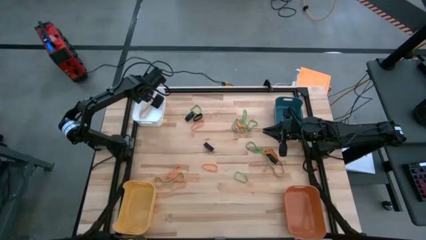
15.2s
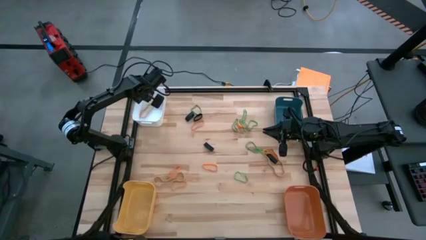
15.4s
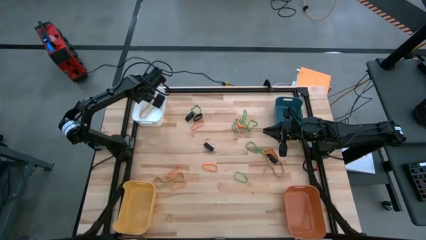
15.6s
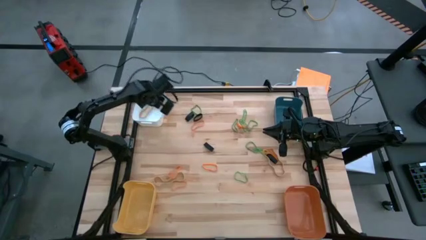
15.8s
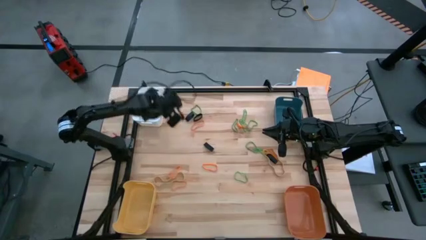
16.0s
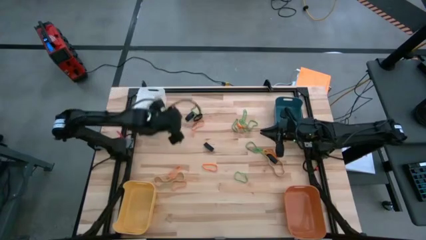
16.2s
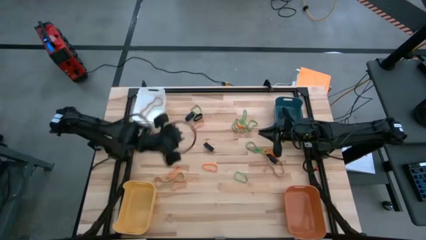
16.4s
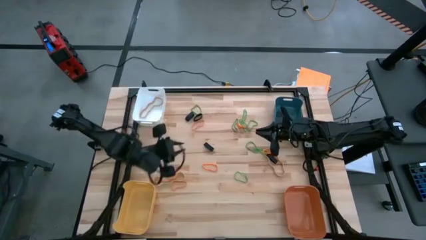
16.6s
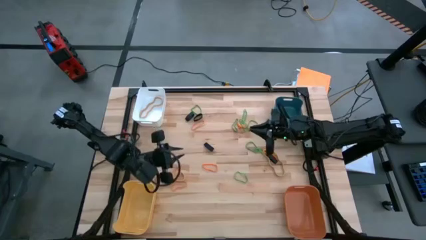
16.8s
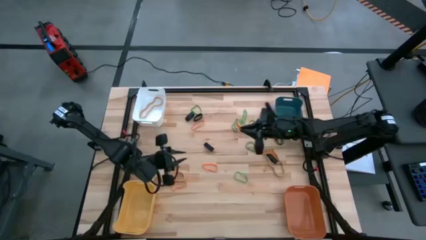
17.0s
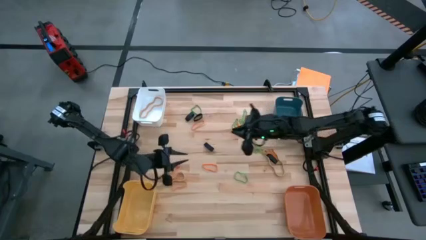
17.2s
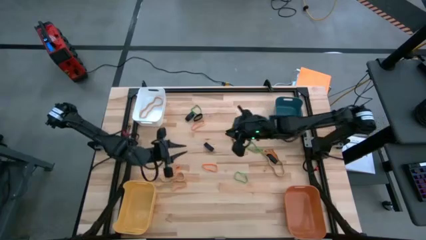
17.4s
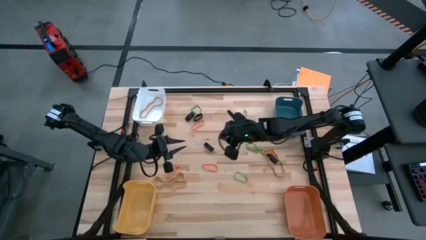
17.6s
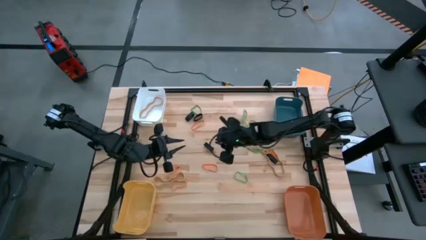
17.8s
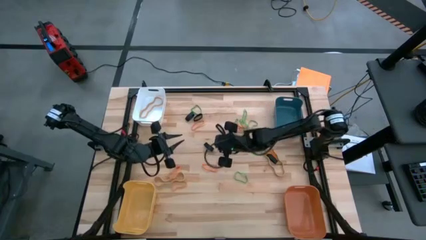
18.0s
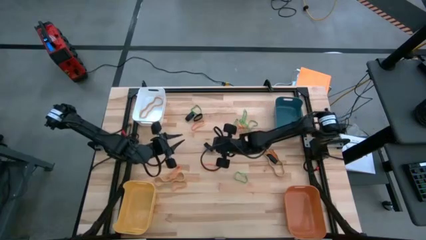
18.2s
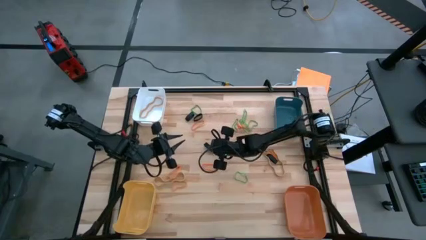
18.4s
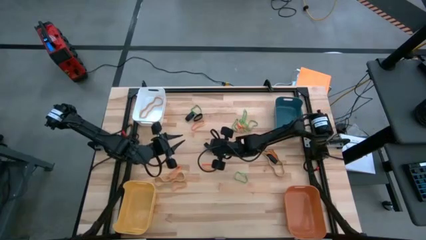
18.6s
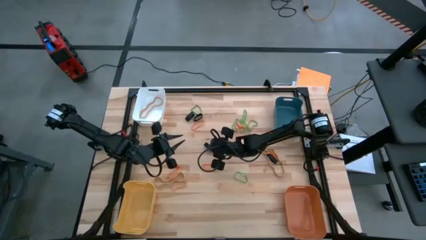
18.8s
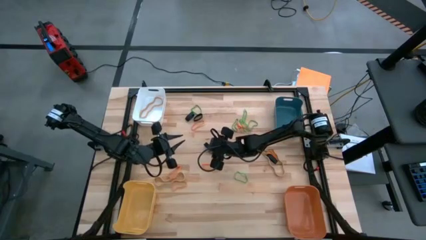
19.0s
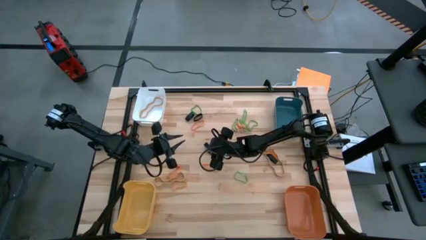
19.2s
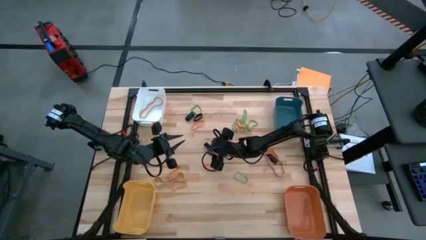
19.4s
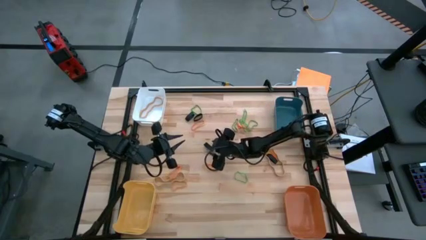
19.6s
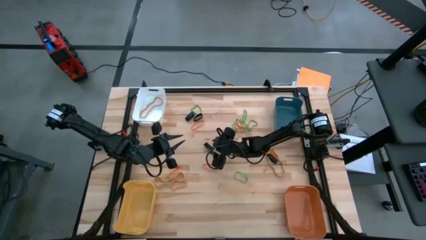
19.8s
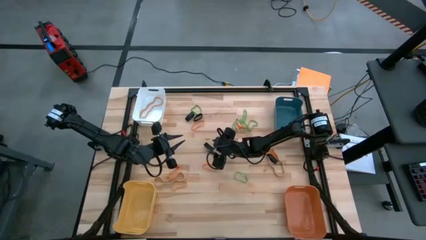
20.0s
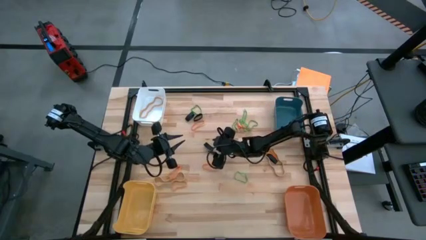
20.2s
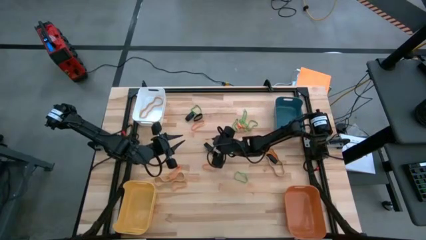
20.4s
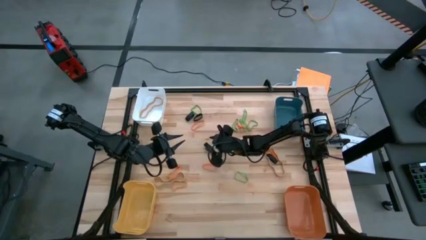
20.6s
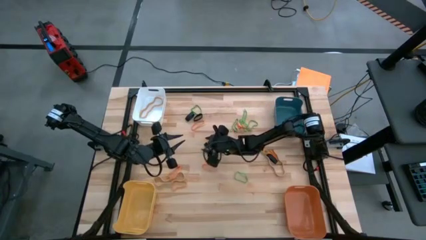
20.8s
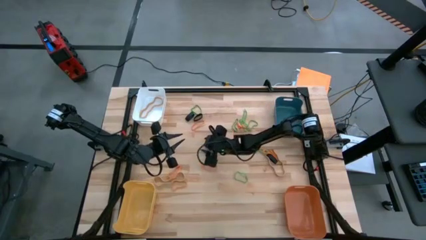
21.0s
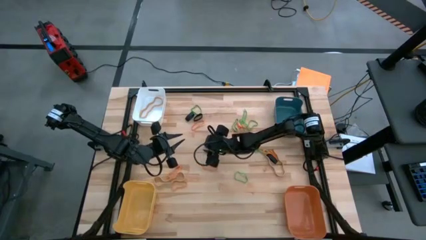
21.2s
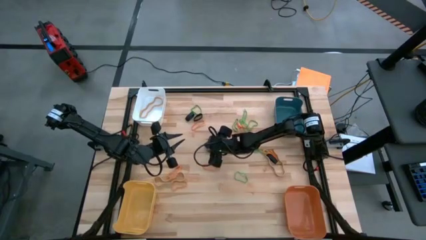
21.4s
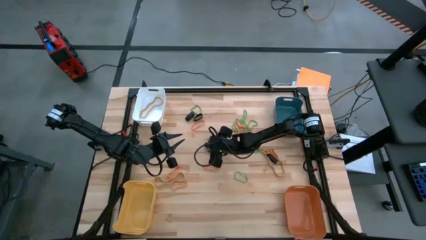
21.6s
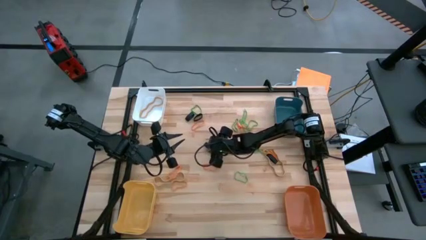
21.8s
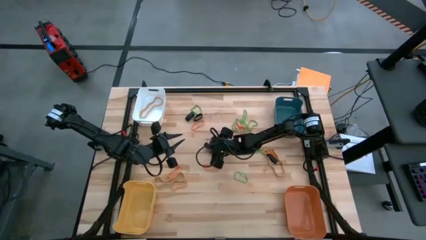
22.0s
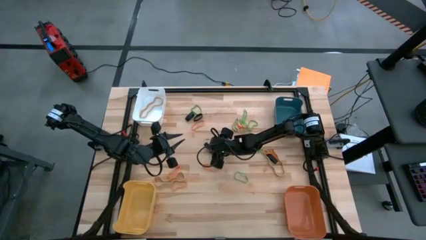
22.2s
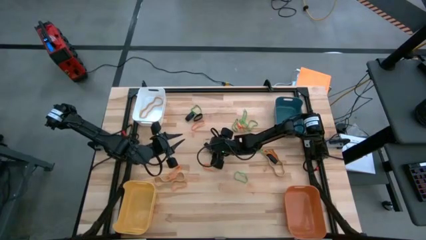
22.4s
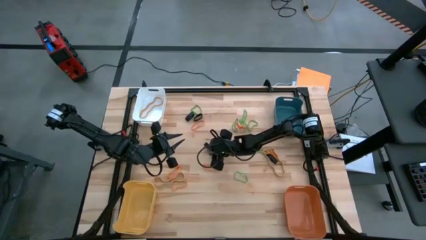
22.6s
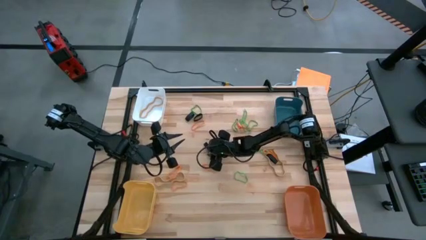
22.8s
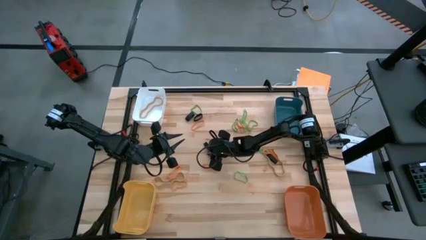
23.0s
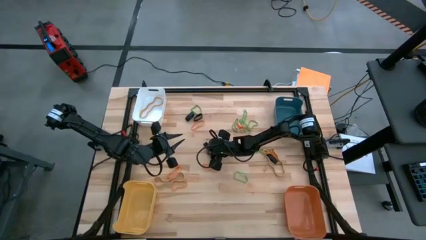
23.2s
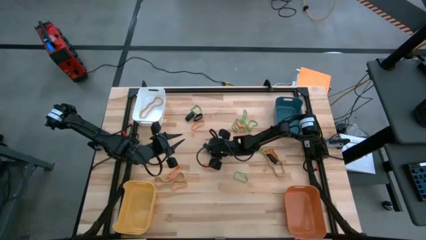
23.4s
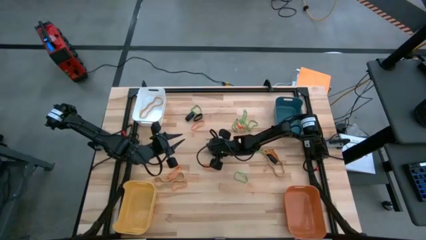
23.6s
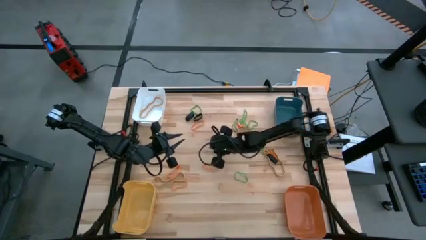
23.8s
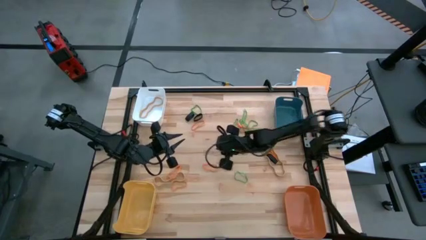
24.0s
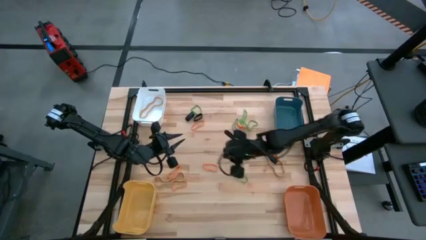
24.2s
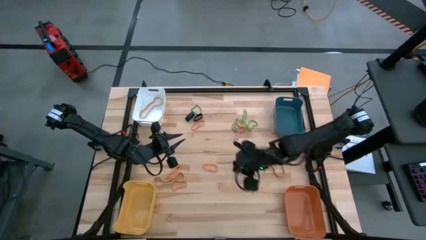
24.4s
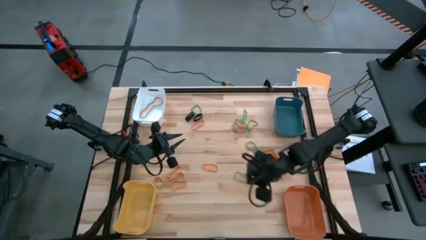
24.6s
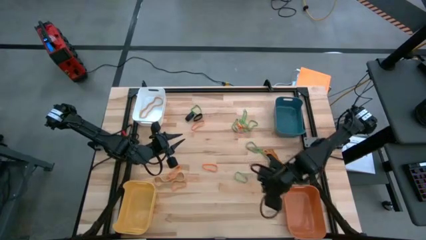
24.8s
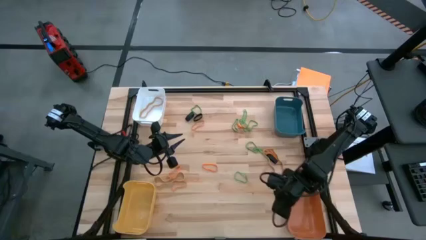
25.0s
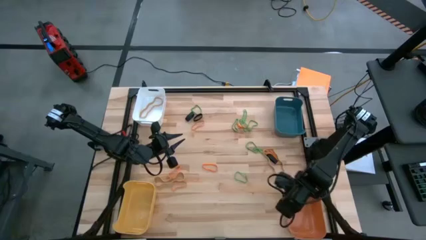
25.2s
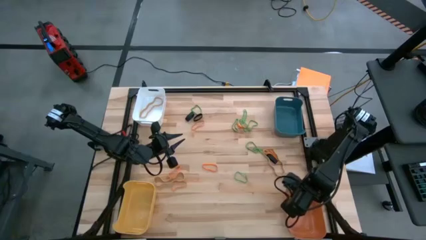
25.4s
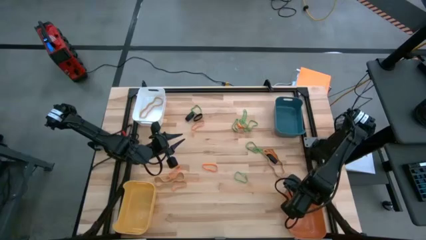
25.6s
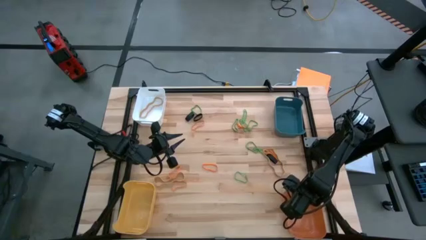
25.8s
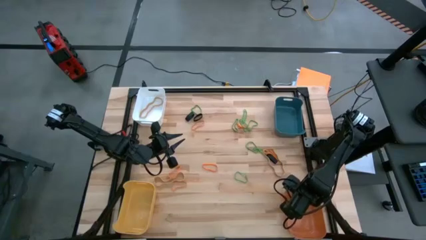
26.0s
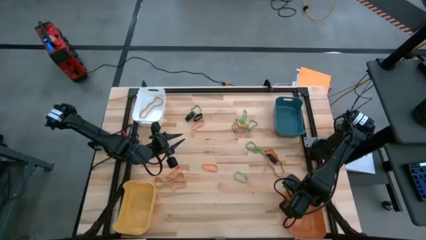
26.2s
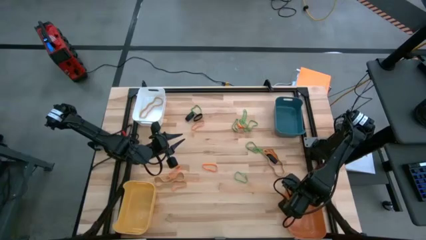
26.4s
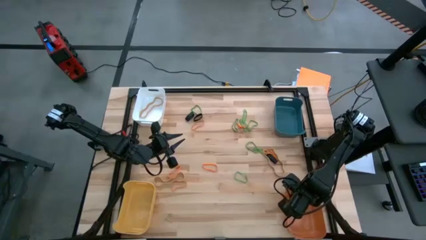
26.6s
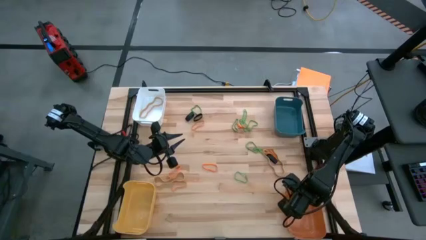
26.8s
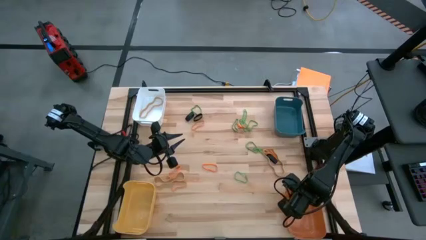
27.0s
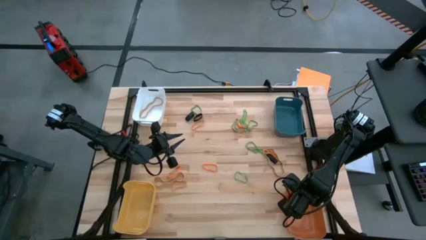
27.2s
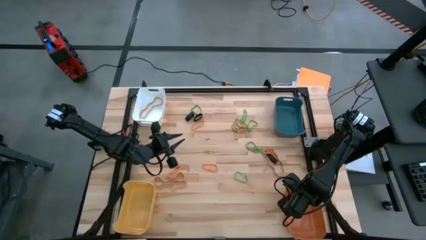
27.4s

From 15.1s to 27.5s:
Task: Sort rubber bands into baskets
Put the black rubber band into the orange bin

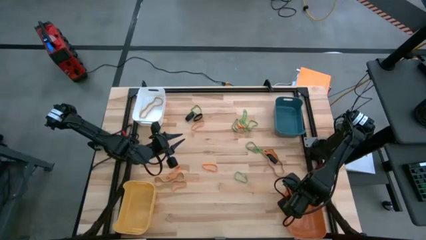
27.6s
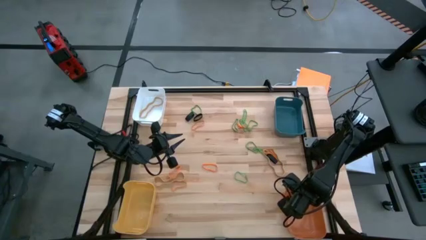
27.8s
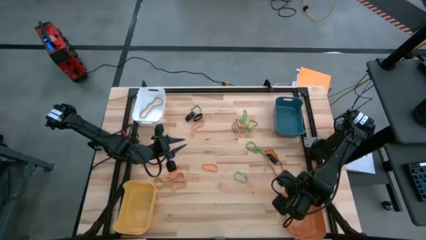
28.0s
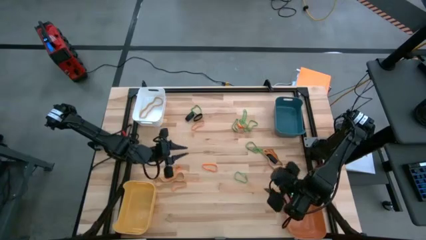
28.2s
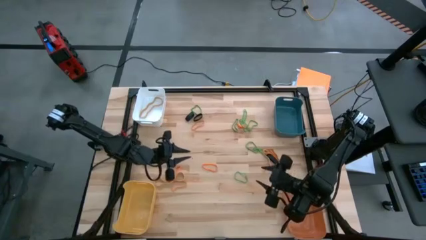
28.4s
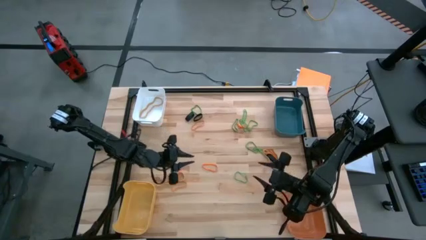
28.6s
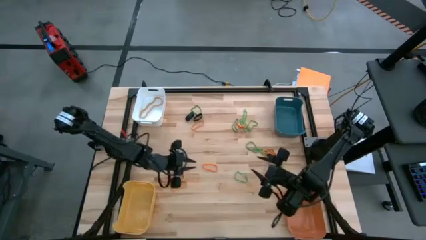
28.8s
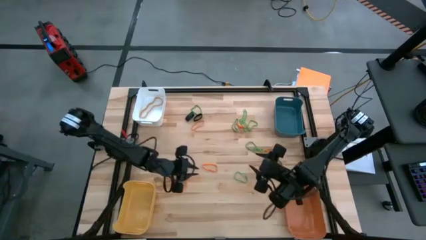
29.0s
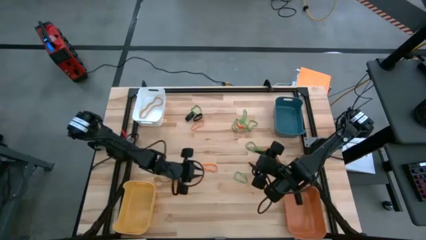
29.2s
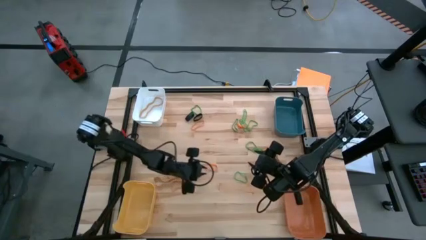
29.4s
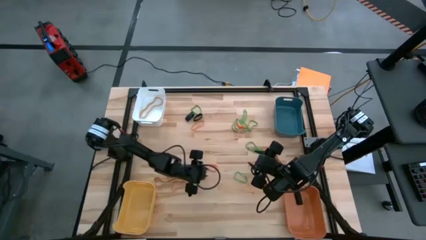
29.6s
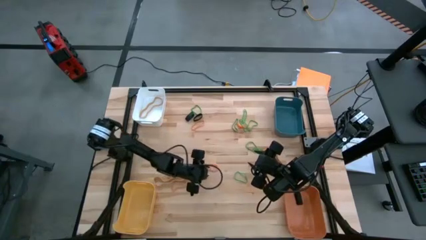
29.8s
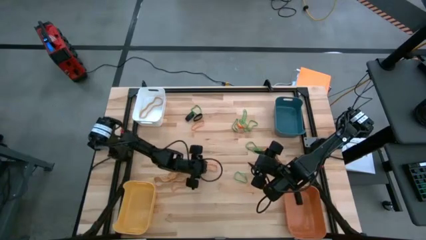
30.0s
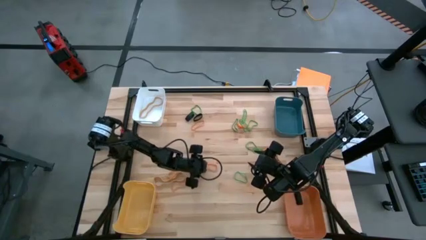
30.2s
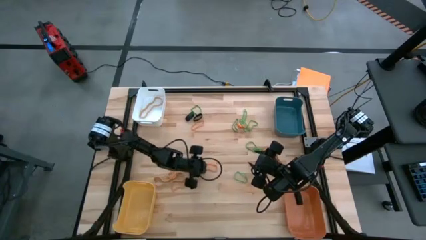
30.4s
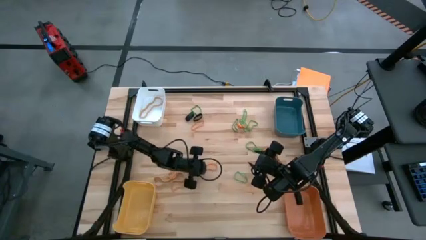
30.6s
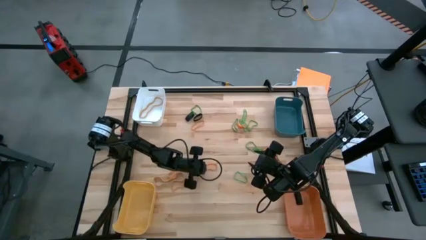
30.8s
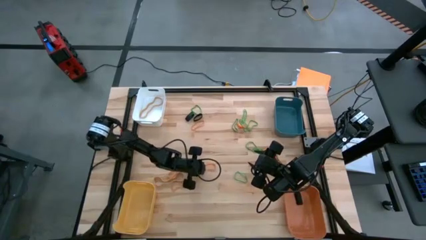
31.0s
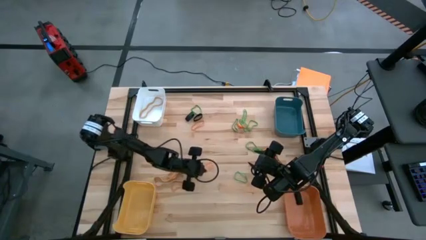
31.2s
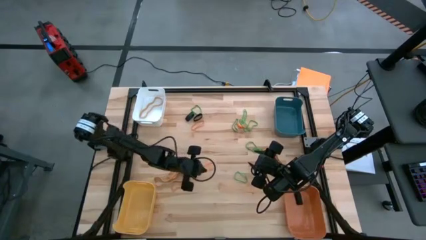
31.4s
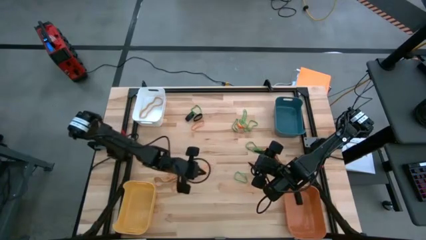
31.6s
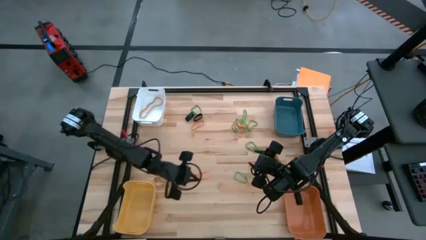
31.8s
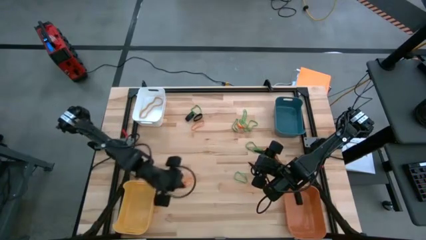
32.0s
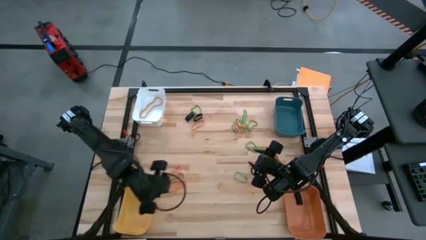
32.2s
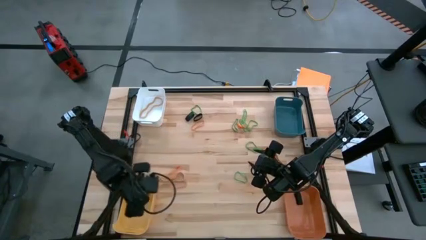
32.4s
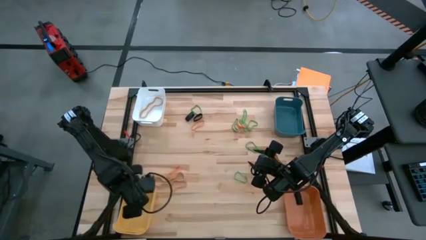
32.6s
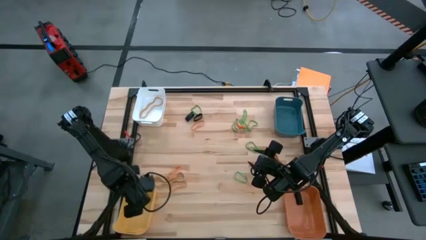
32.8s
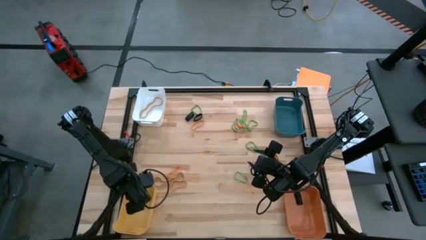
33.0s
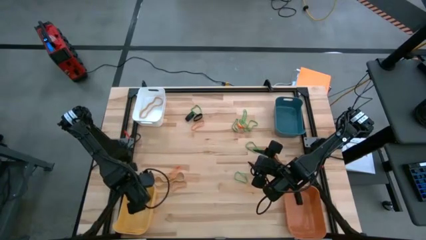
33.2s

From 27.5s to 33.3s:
Put the orange rubber band into the yellow bin
